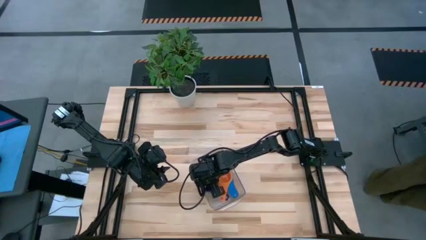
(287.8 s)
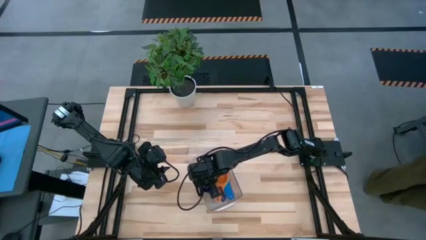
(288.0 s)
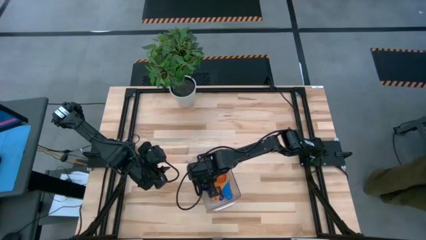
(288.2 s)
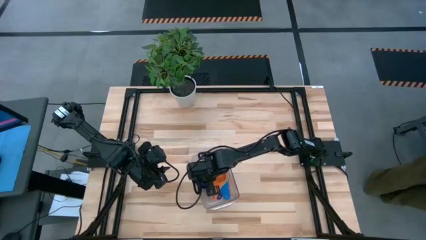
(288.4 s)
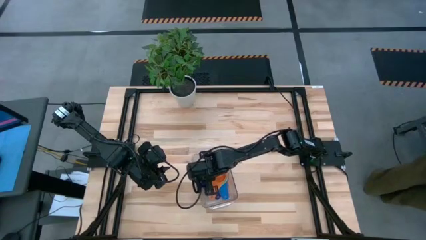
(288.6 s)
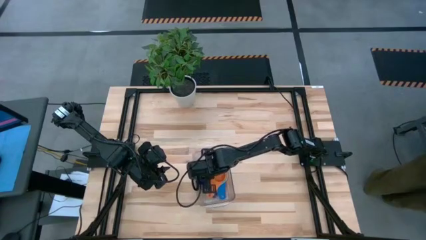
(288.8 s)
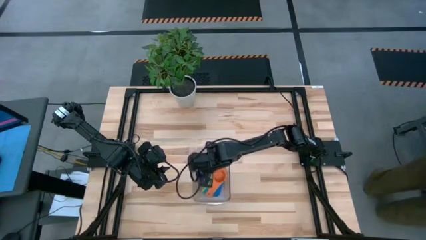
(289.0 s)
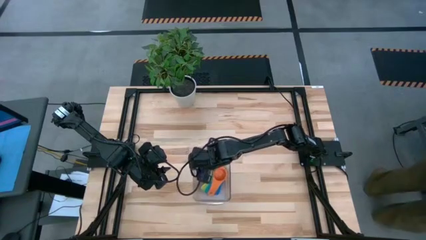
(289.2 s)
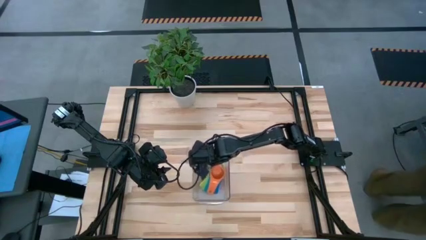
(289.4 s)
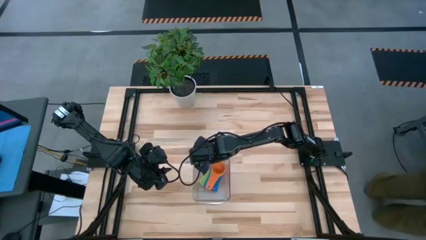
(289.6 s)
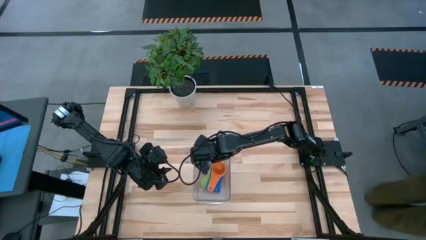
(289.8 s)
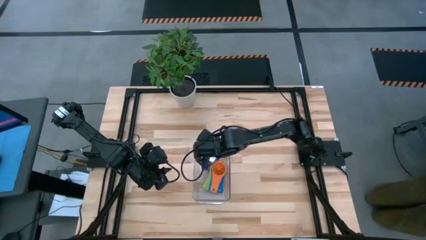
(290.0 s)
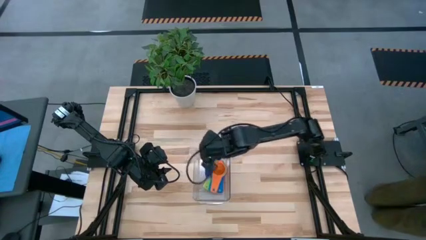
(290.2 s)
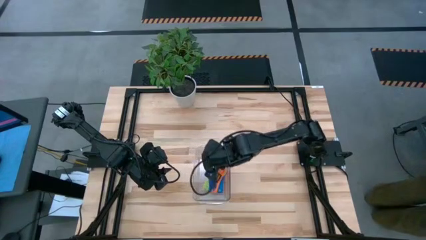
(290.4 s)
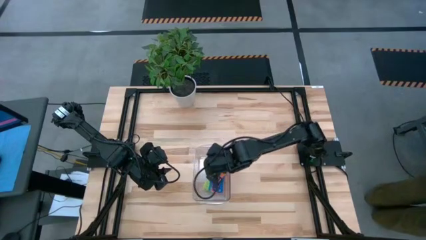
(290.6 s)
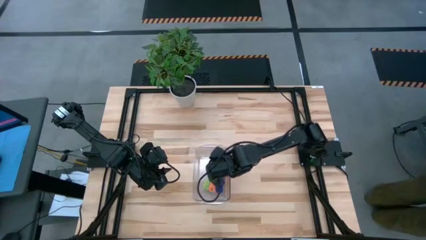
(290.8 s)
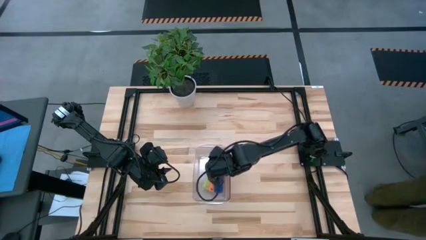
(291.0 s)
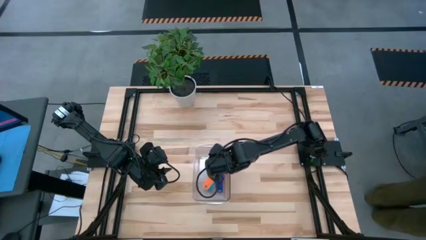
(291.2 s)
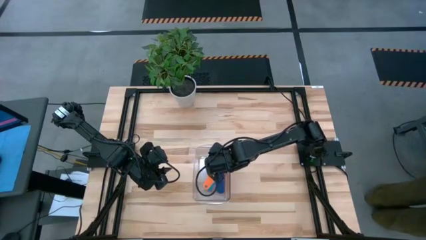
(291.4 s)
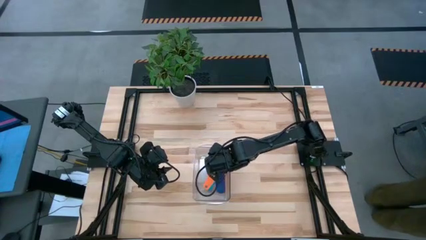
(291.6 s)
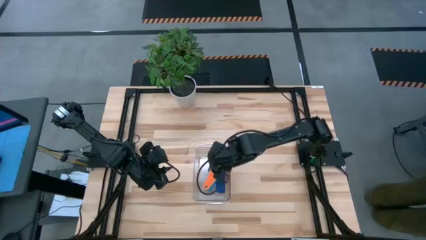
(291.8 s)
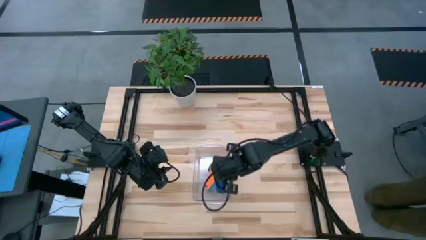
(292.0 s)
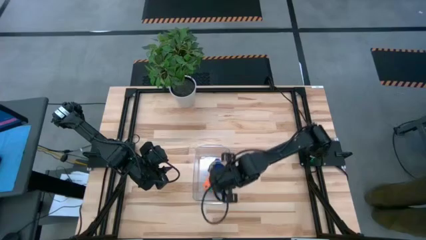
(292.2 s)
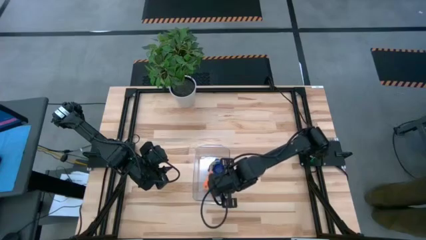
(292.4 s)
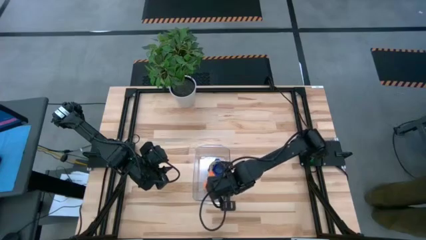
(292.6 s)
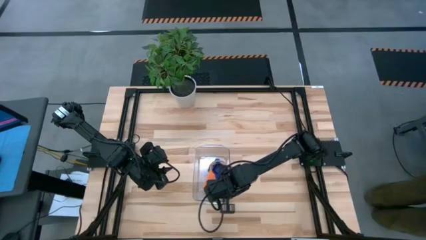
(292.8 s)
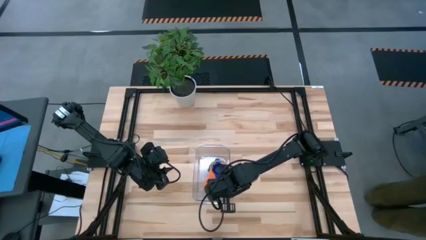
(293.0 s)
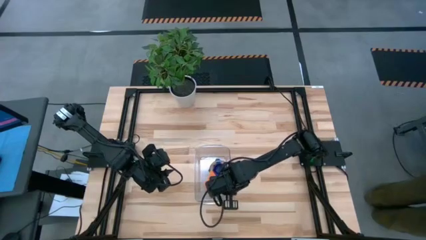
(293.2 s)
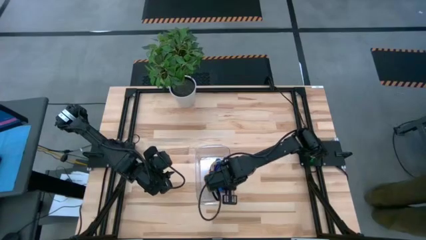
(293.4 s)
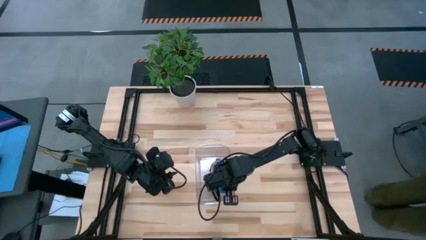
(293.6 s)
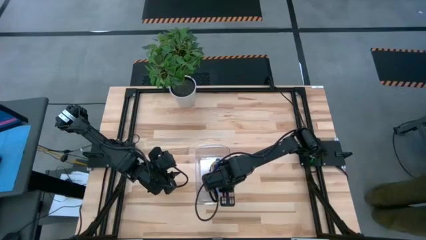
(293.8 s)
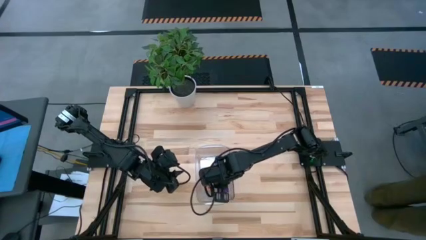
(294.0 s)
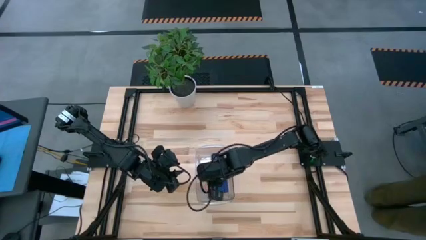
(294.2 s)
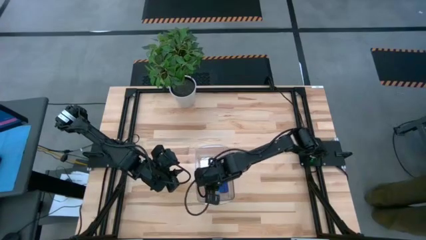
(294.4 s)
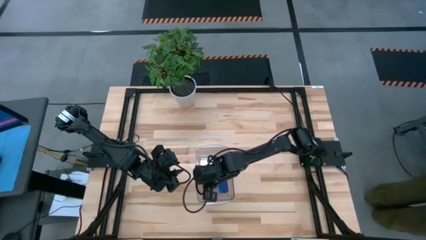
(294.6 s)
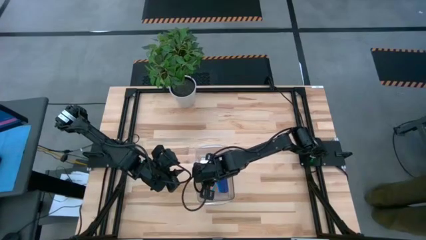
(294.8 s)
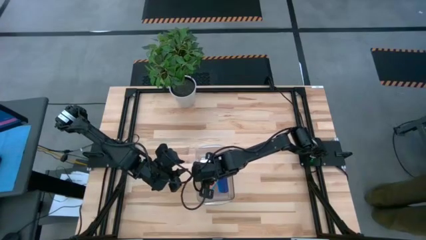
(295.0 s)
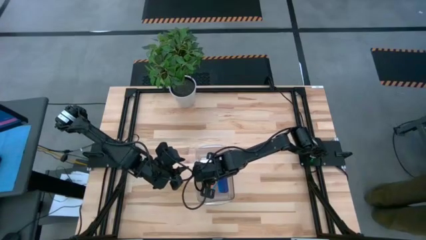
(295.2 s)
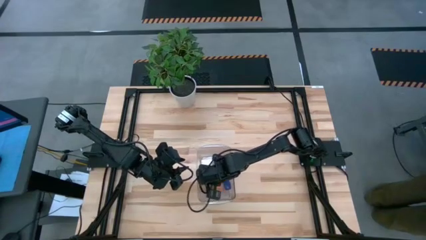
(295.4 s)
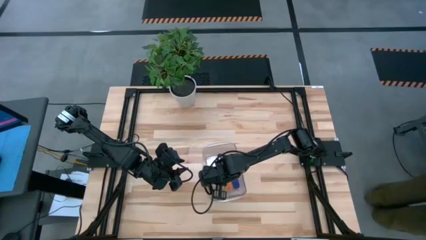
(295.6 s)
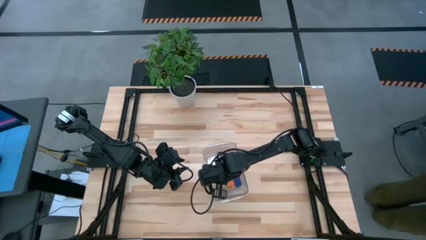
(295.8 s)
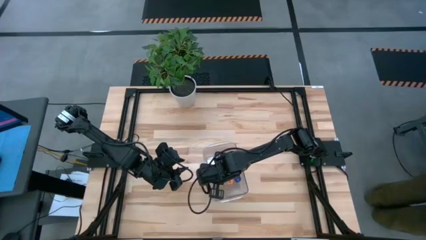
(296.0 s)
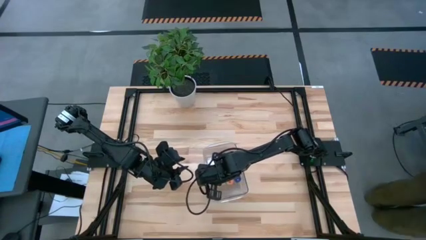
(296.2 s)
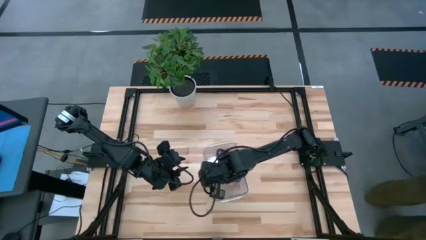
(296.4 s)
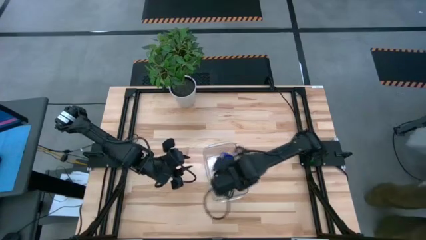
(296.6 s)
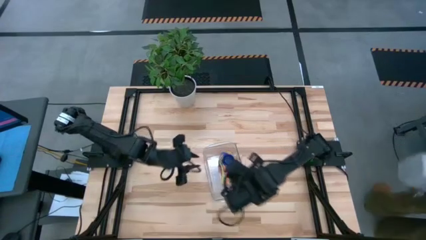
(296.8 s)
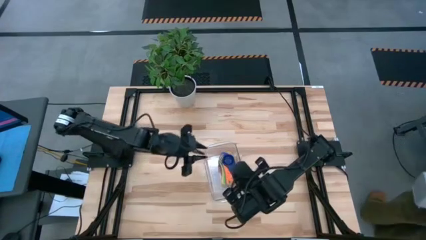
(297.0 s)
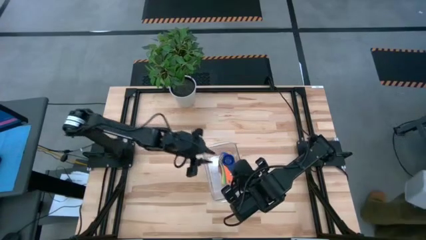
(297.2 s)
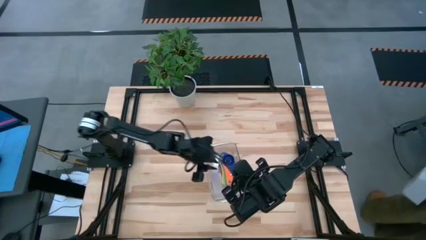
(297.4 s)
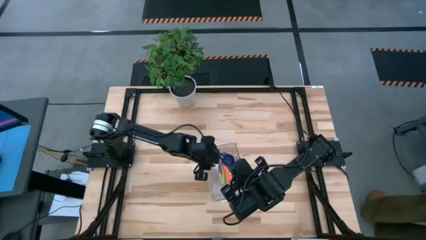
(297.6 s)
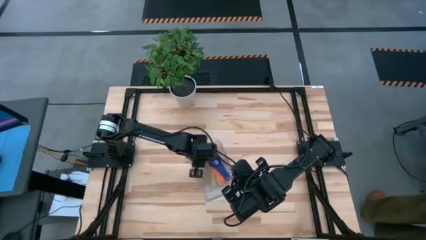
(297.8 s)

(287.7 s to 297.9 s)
Task: Nest measuring cups in basket
Stack the dark blue measuring cup on top of the orange measuring cup

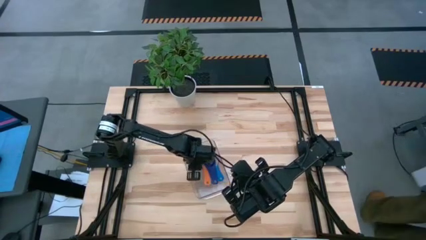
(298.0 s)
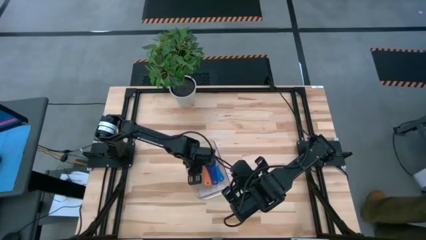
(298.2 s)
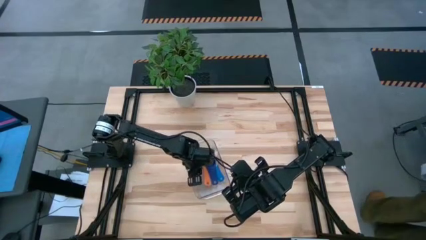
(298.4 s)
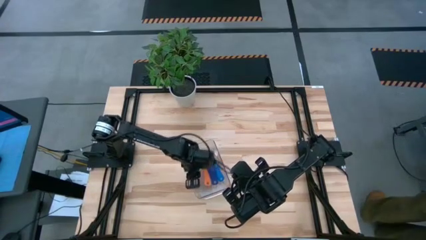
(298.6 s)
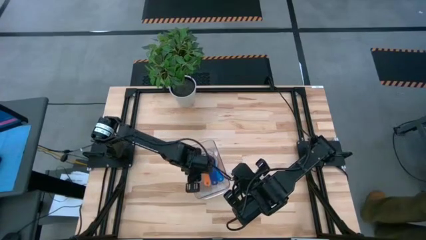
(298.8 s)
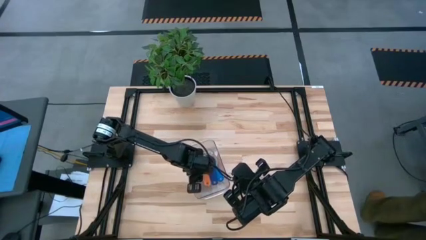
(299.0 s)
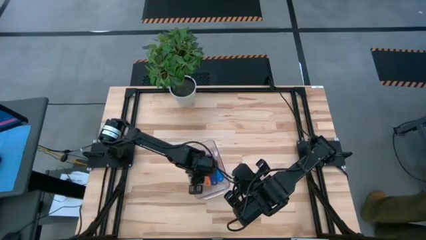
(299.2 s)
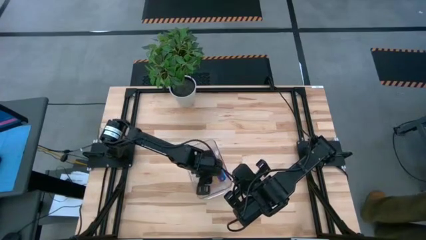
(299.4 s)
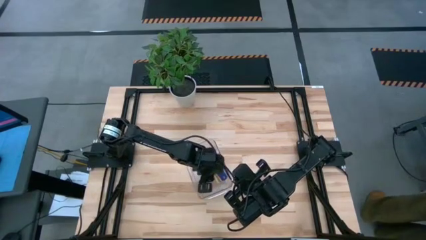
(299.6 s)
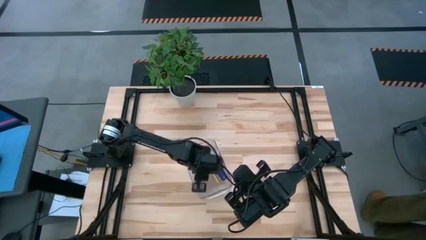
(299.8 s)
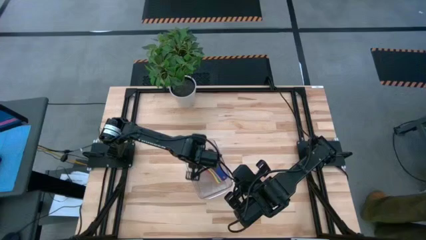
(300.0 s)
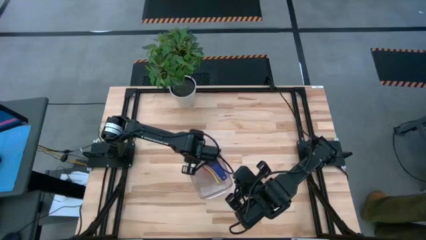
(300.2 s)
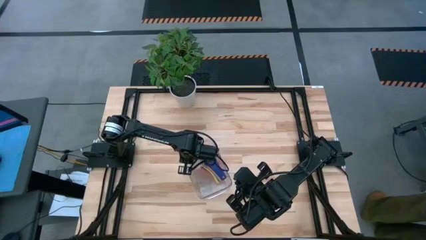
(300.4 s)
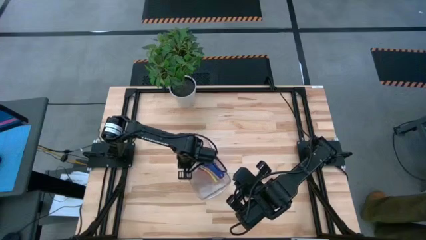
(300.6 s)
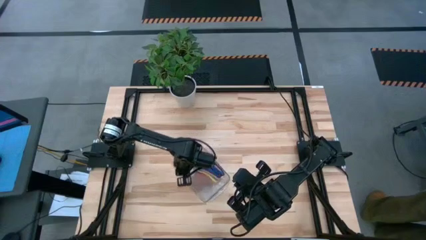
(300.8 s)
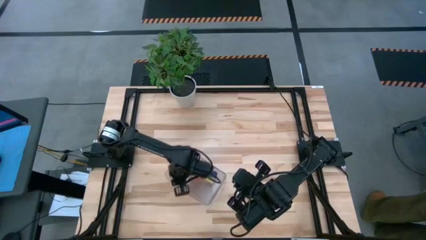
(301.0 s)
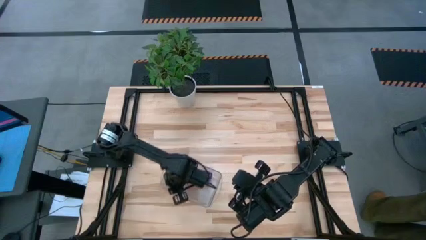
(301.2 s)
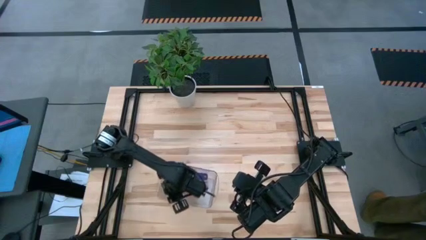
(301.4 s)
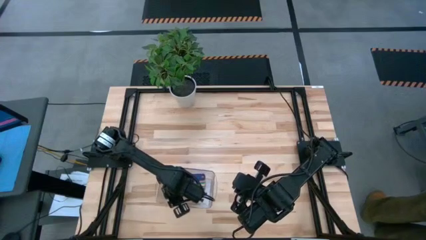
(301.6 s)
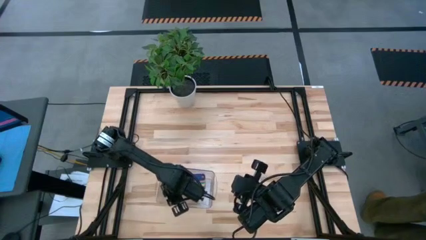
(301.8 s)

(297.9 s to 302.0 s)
Adjust the transparent bin on the table

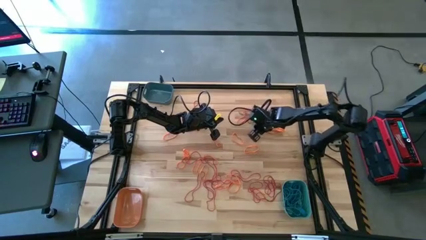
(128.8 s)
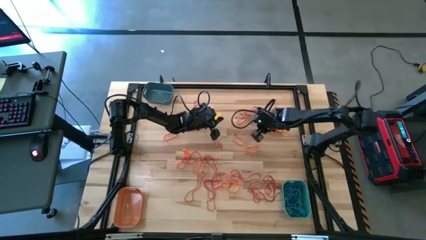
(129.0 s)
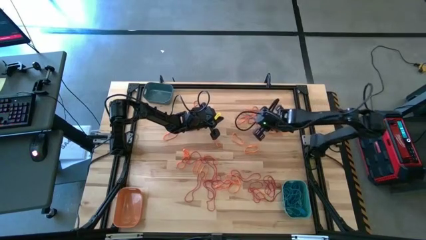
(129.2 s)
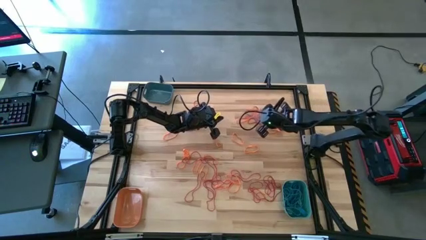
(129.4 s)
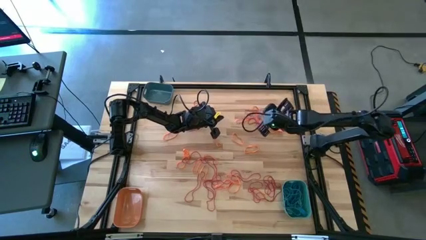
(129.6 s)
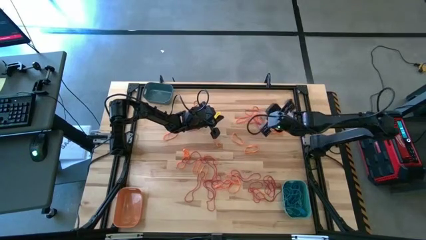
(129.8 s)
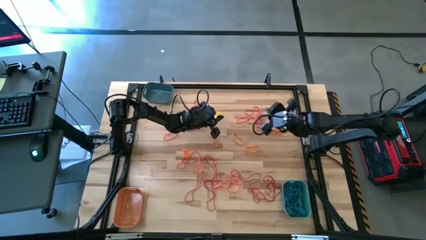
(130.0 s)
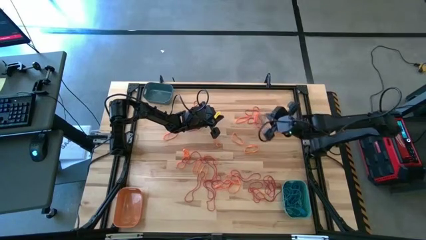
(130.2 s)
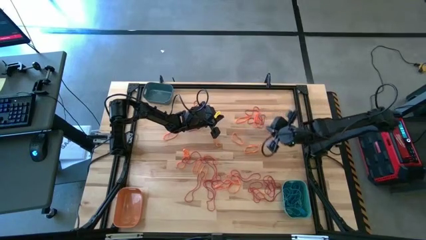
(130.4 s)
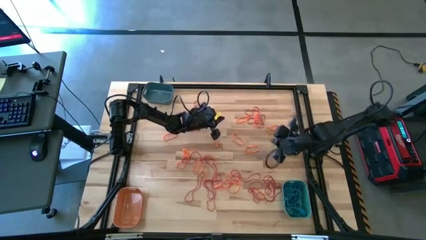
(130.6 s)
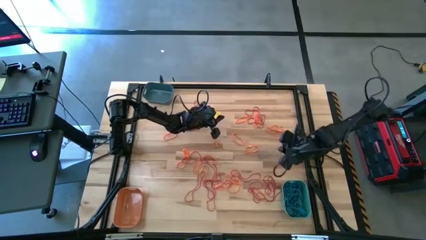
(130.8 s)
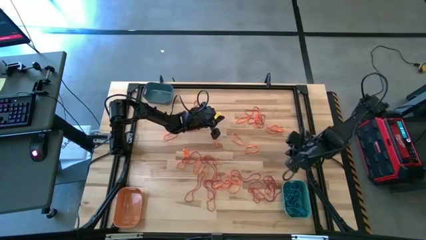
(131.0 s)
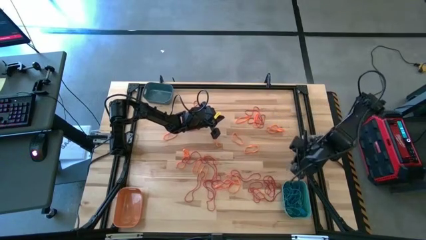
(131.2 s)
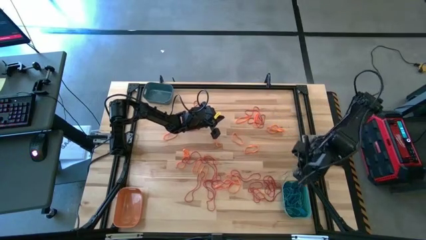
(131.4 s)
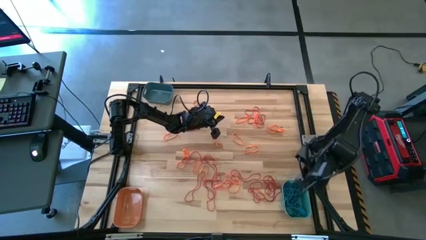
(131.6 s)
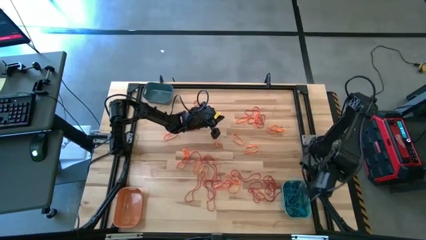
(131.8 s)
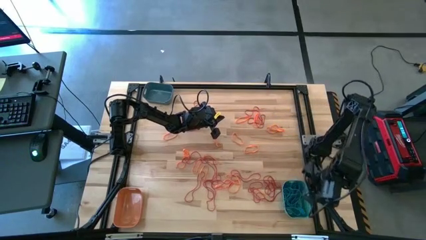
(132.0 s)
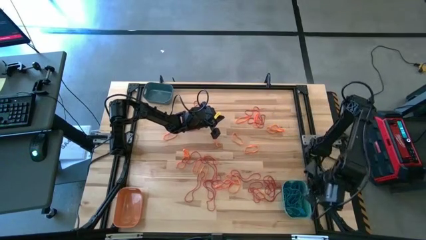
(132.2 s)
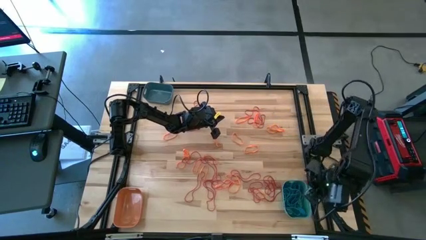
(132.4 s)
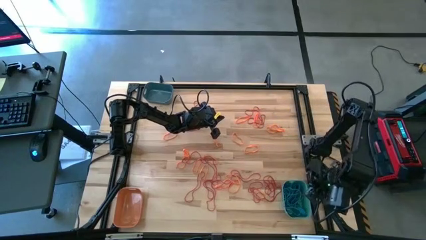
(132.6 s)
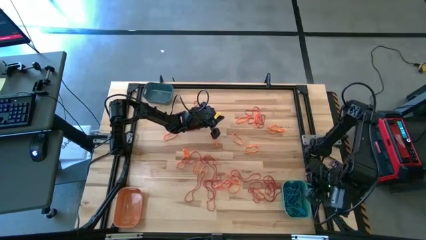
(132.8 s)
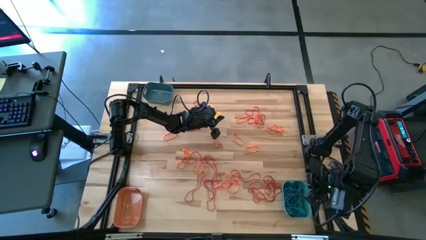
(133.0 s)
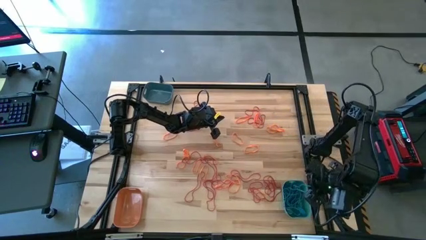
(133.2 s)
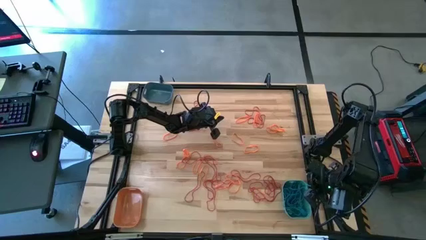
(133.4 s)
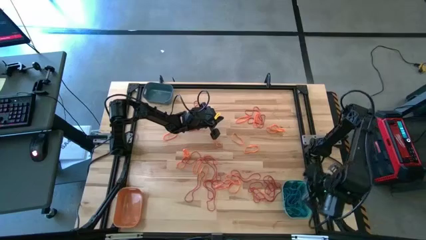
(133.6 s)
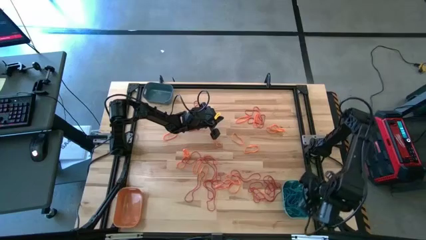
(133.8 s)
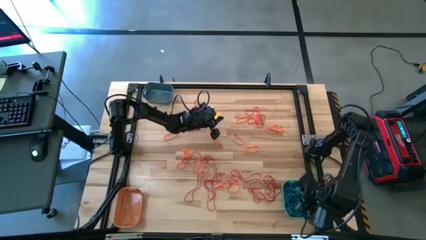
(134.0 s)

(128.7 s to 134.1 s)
Task: Sort rubber bands into baskets
Put the blue rubber band into the light blue bin
